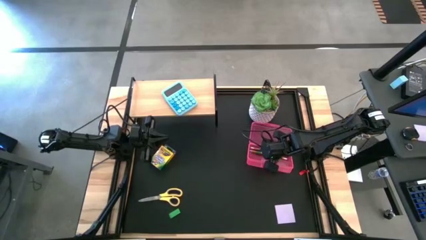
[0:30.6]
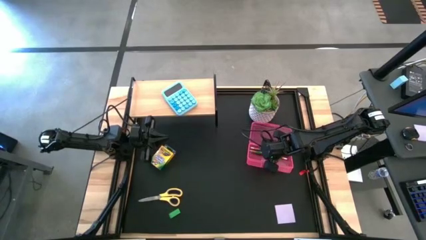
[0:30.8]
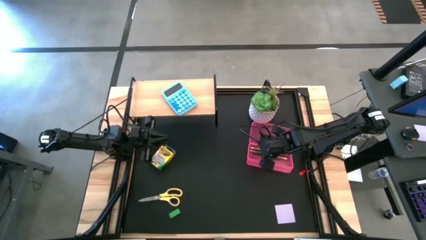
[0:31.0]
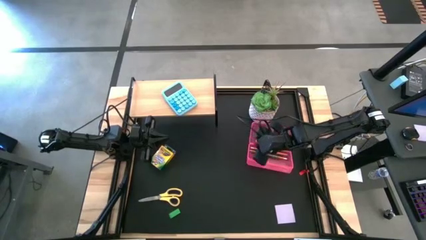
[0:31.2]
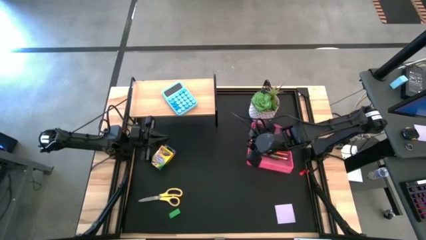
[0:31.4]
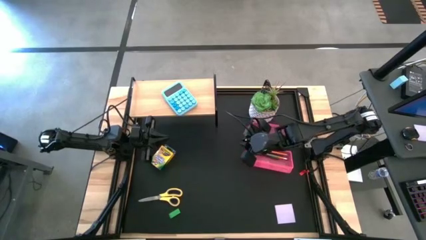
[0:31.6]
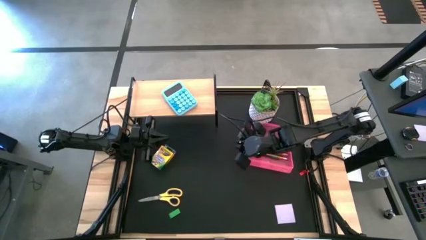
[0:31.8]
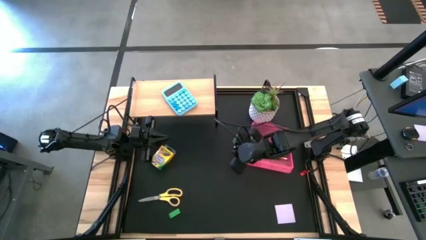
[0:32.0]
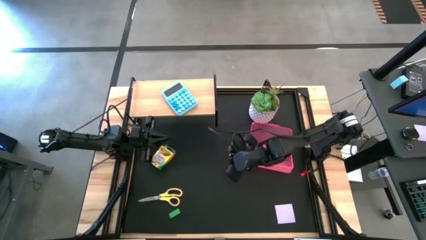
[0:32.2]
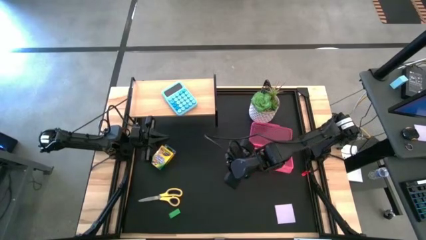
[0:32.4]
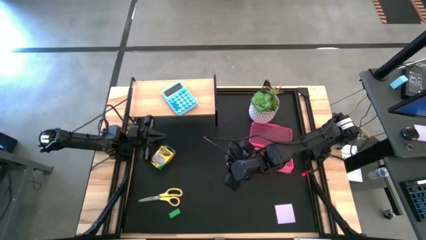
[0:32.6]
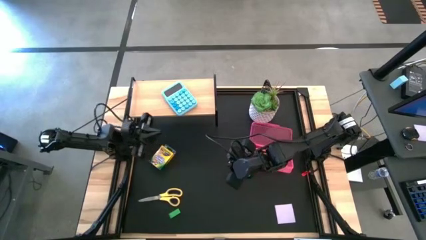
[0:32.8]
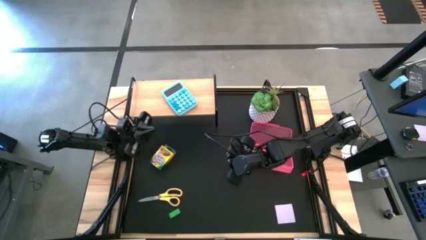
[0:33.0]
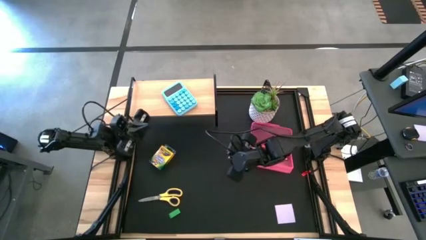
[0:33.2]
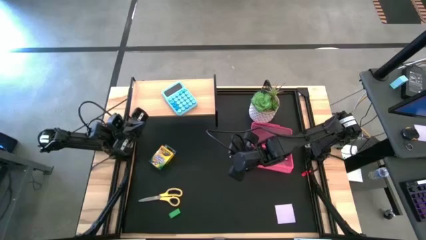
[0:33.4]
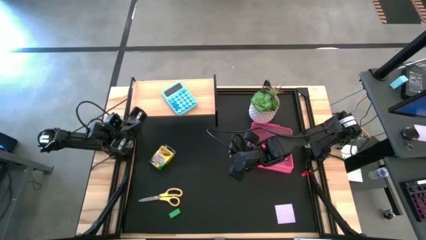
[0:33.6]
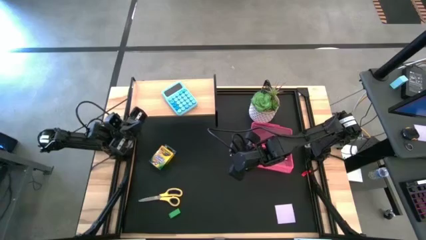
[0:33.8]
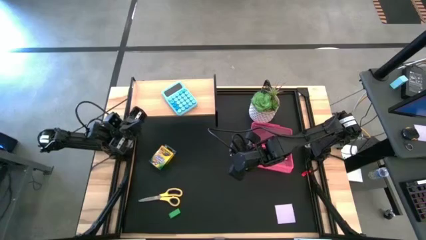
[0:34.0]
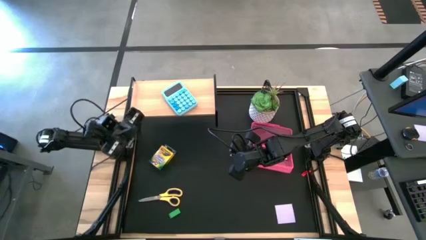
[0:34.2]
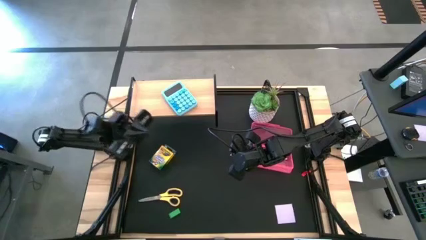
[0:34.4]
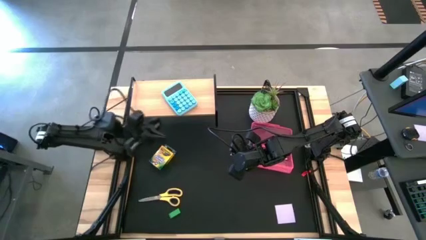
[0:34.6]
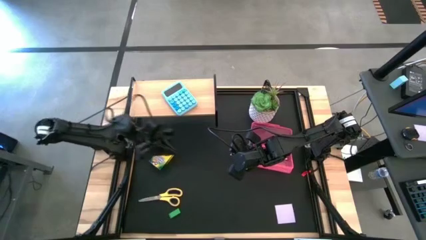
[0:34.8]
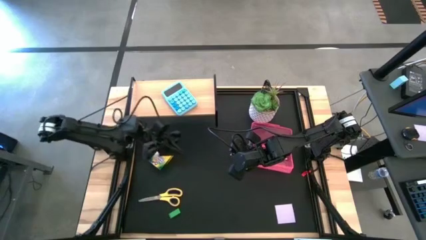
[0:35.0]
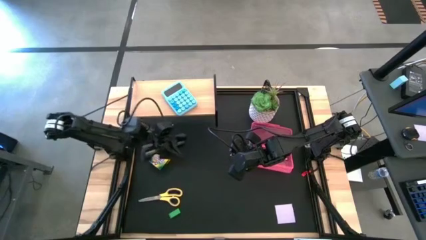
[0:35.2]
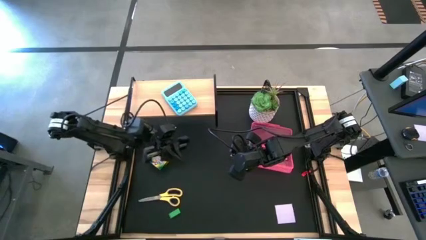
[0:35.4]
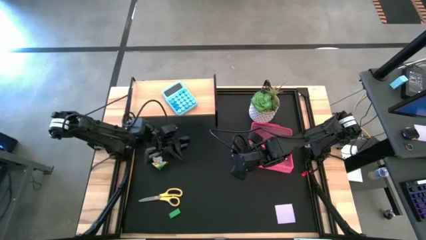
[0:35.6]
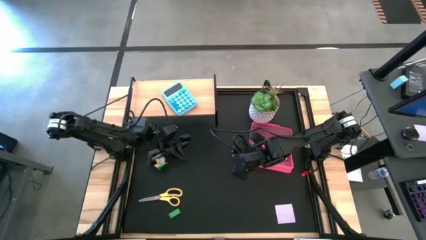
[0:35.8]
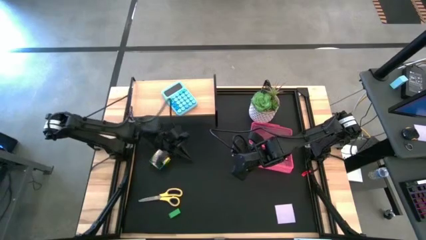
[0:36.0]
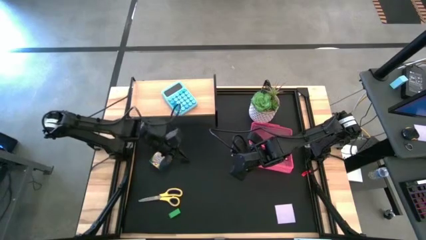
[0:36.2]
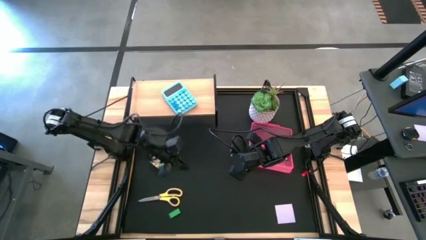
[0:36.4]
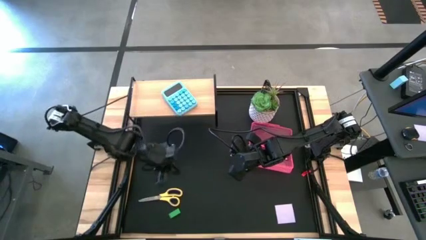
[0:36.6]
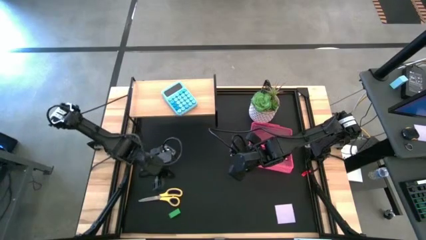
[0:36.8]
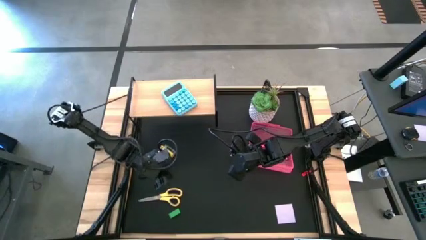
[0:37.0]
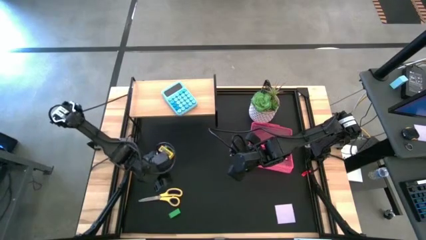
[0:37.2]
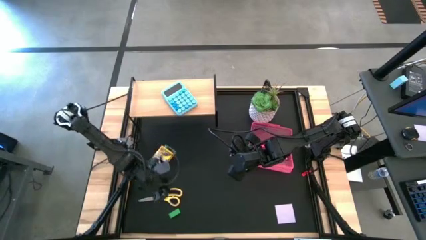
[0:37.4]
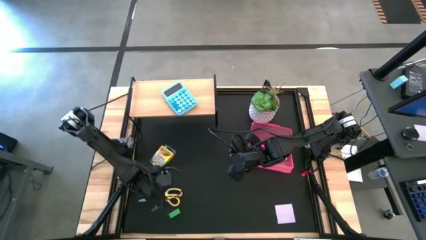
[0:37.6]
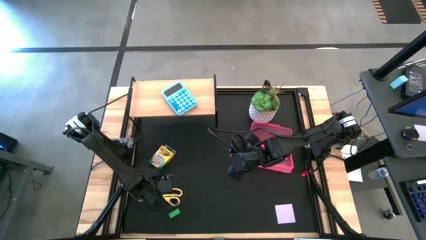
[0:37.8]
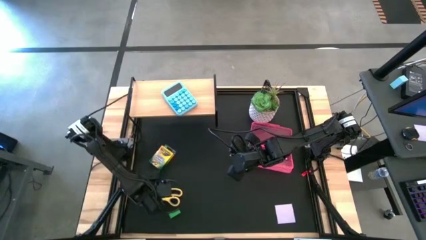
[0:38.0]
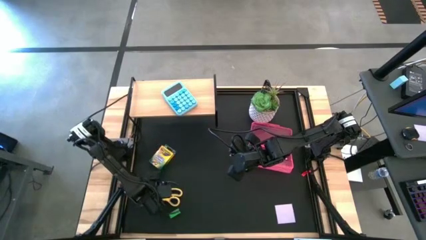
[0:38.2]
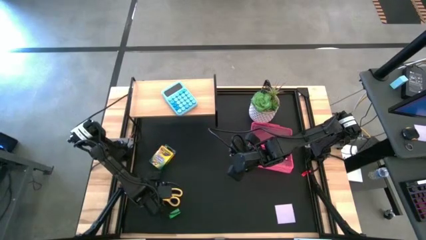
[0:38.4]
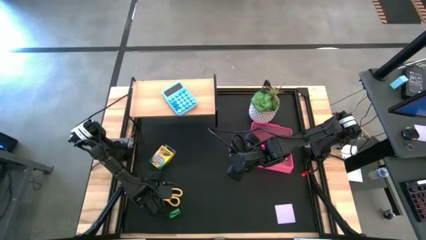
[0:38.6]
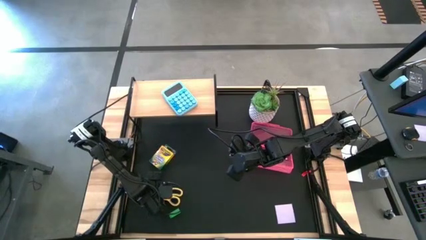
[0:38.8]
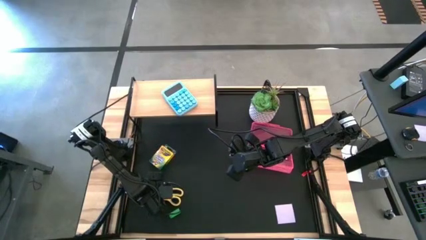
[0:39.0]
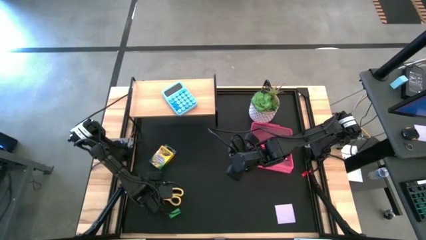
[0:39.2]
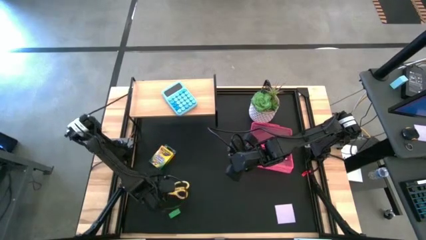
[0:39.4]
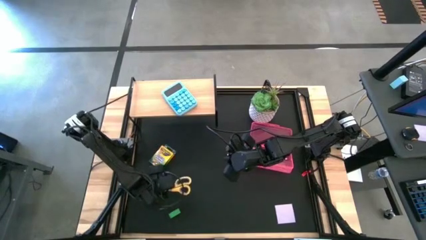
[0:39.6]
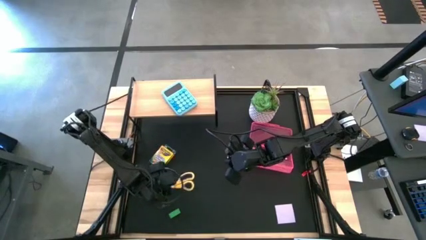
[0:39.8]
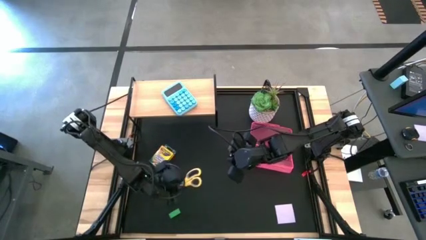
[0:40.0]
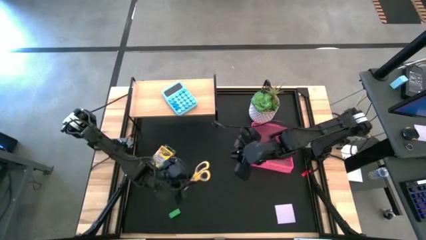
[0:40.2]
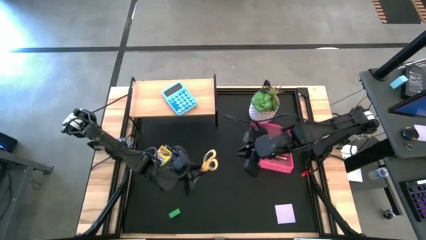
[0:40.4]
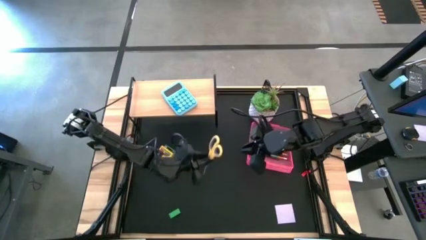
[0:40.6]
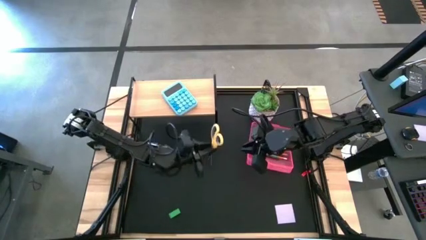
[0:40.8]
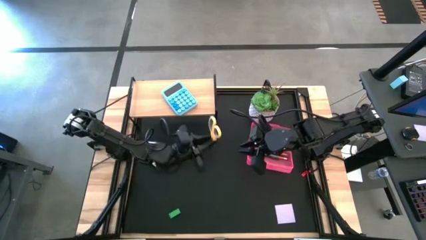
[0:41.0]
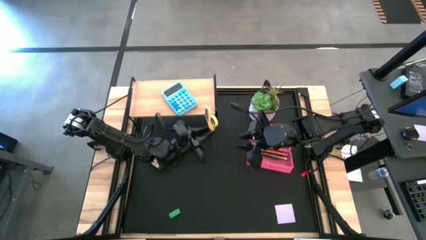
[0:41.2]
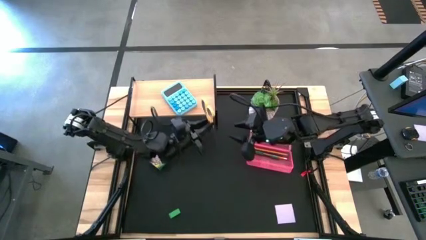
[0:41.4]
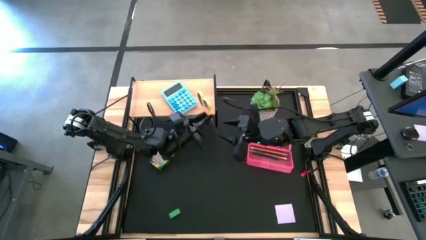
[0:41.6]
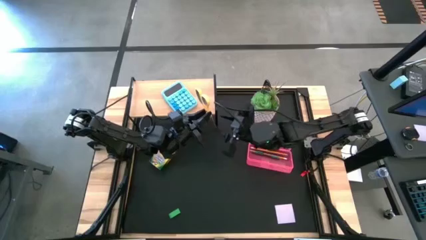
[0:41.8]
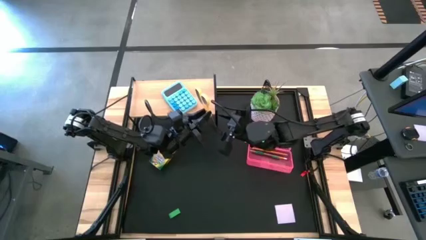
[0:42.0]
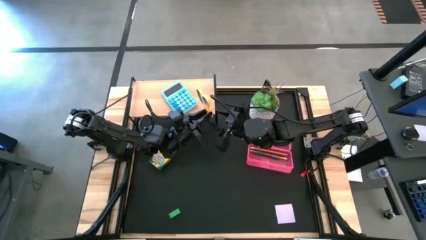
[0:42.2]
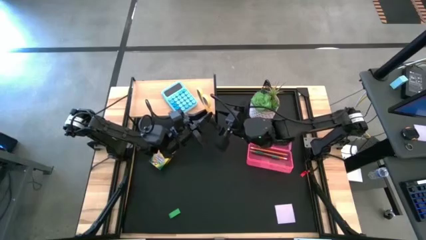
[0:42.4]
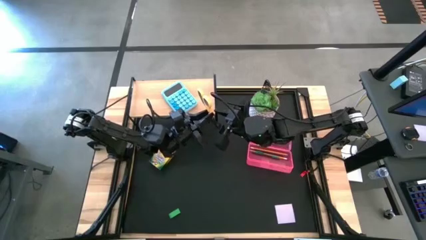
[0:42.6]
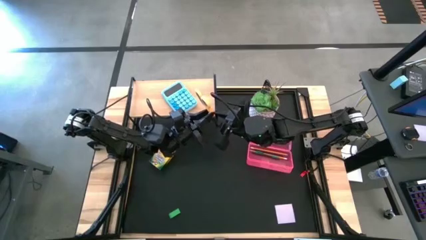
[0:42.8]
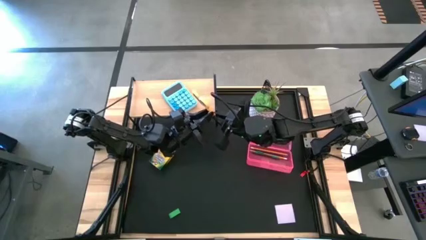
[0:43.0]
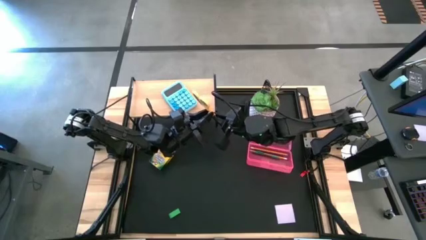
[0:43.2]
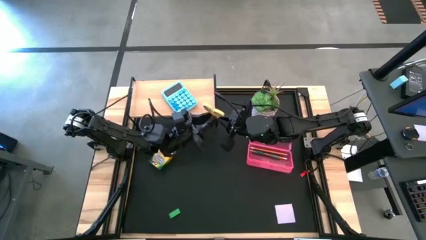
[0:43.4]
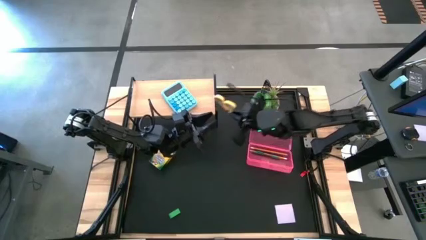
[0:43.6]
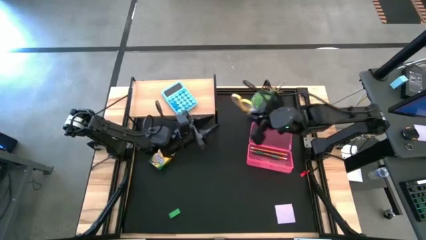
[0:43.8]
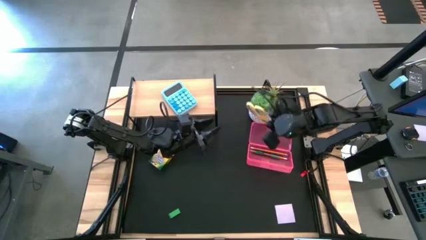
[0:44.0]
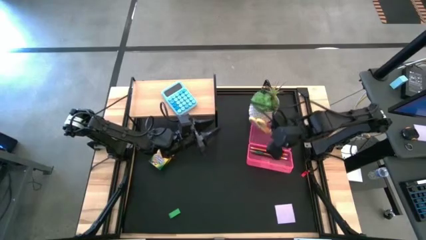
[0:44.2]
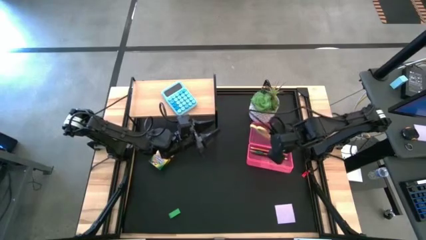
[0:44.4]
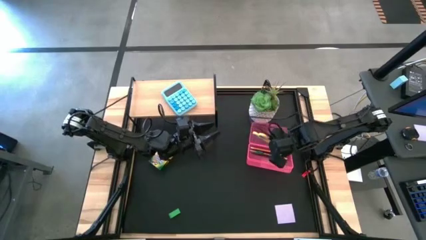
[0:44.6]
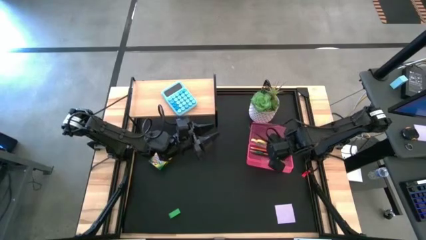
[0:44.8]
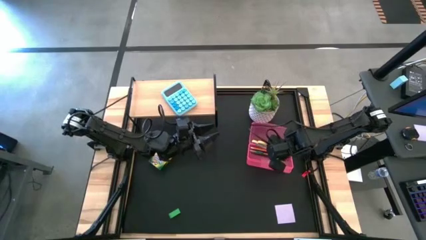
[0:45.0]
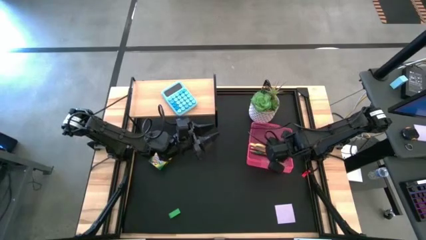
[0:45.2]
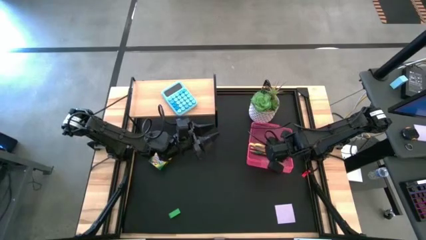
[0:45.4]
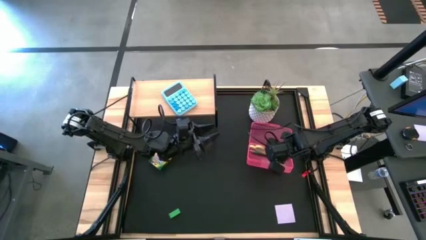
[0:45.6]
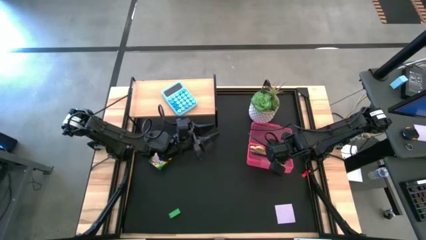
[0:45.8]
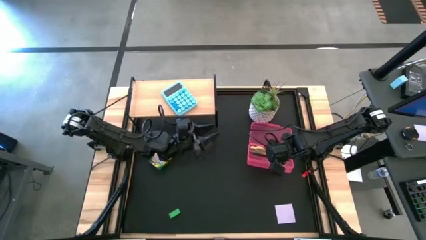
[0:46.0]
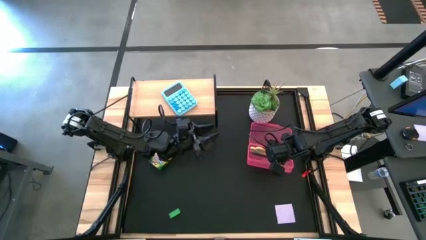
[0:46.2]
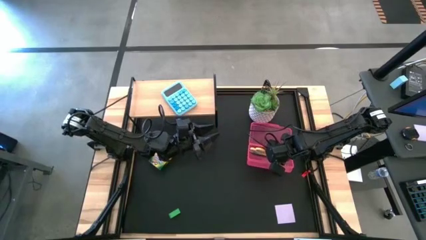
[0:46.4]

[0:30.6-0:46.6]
Task: Pack school essentials
Put the yellow scissor into the pink supply box
